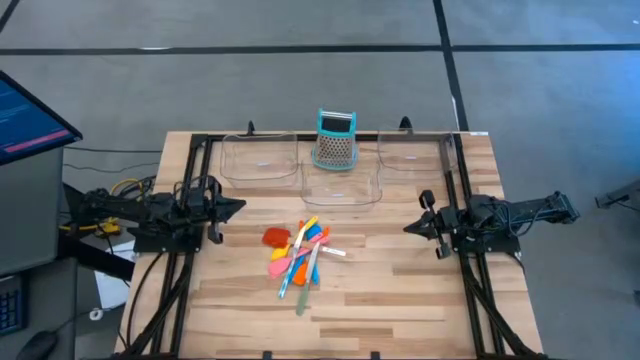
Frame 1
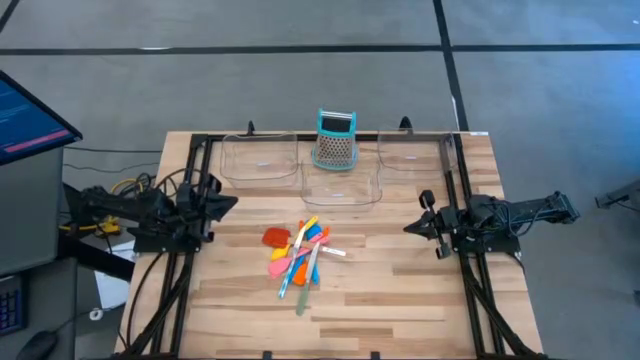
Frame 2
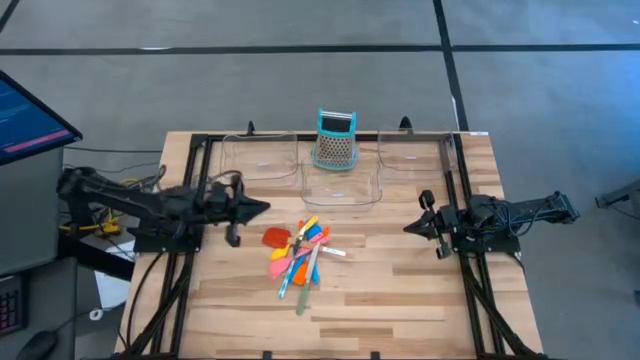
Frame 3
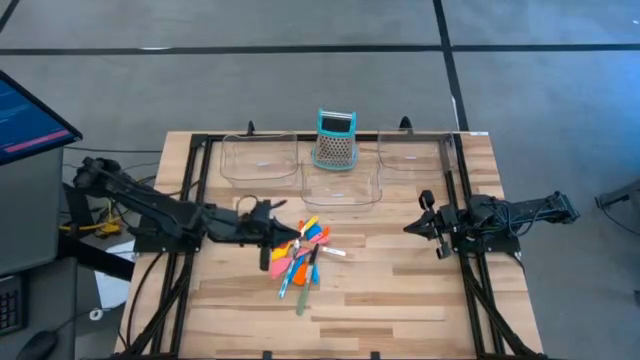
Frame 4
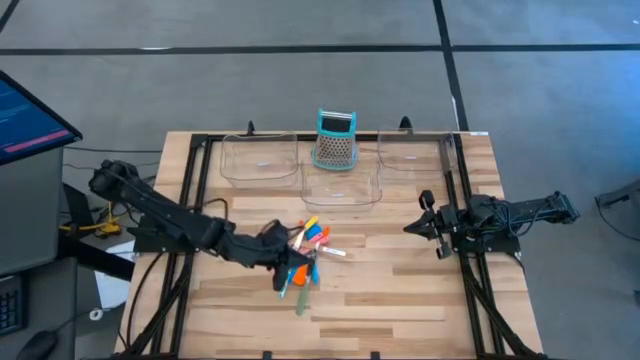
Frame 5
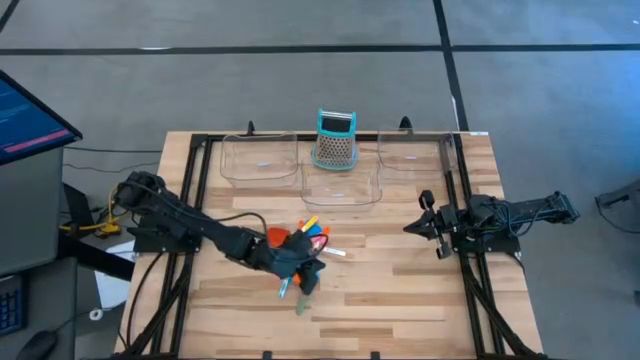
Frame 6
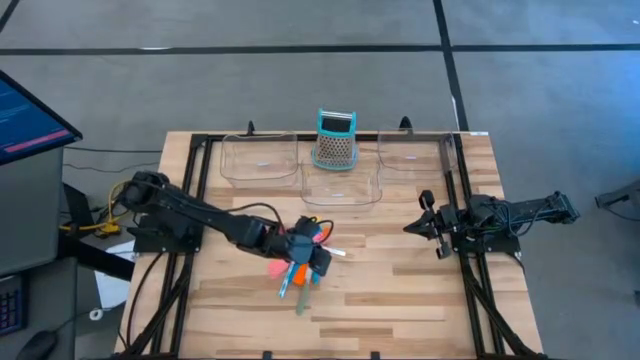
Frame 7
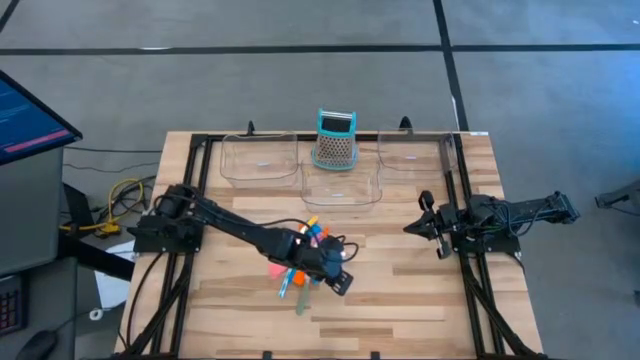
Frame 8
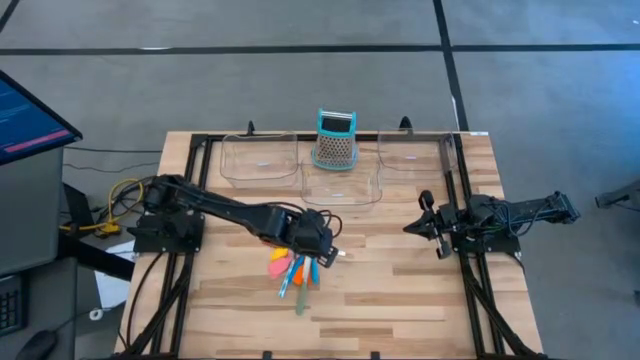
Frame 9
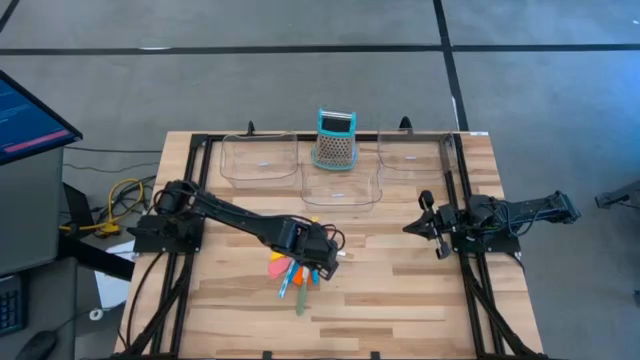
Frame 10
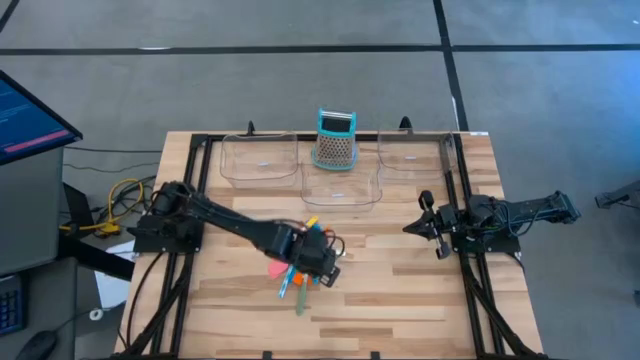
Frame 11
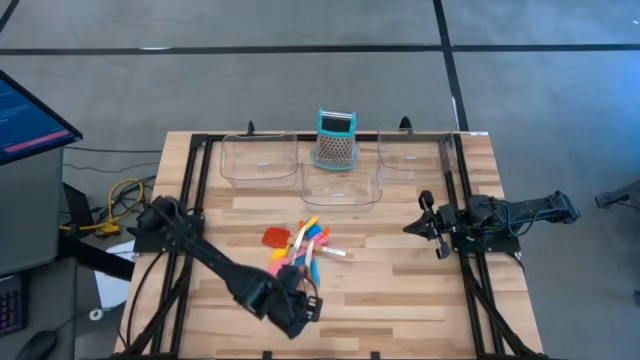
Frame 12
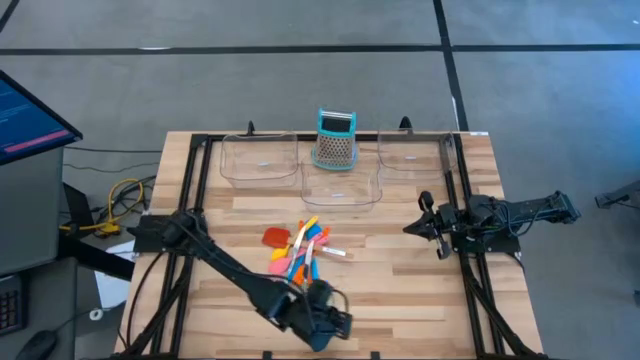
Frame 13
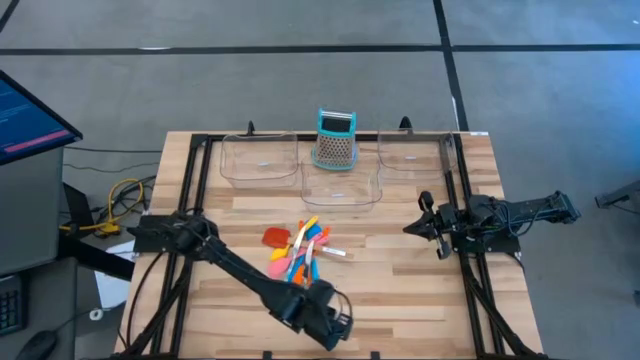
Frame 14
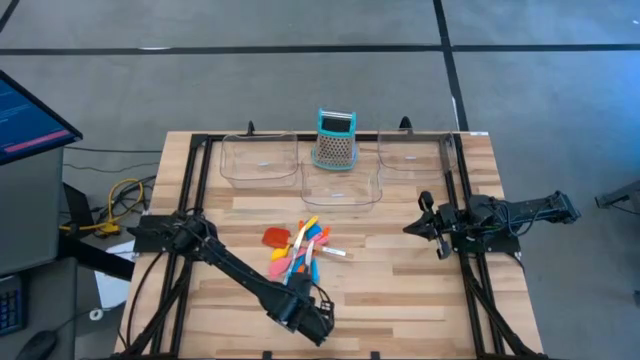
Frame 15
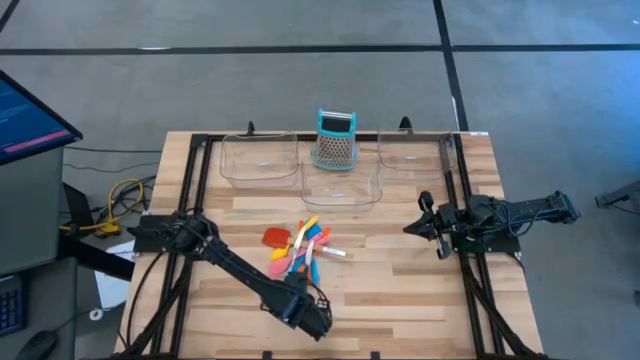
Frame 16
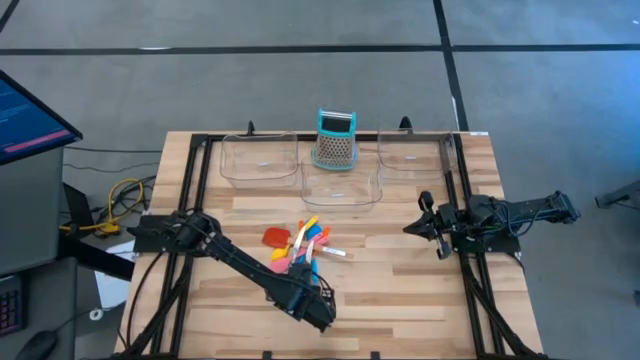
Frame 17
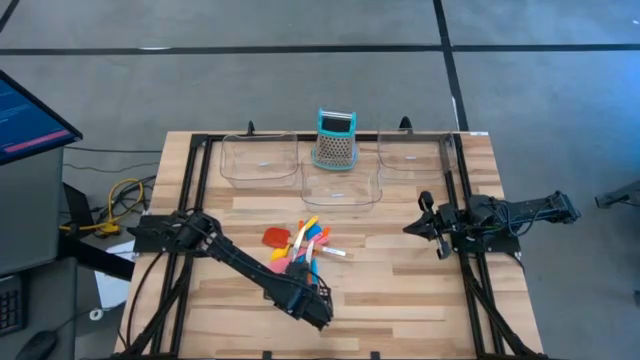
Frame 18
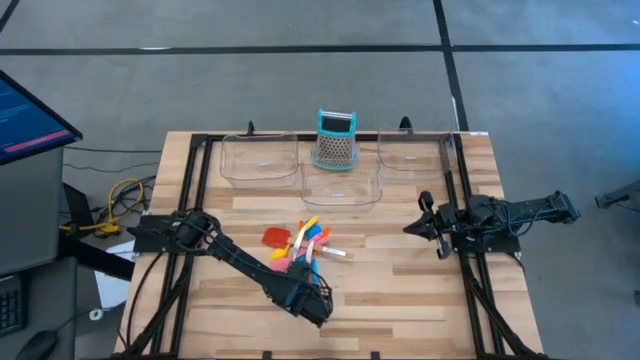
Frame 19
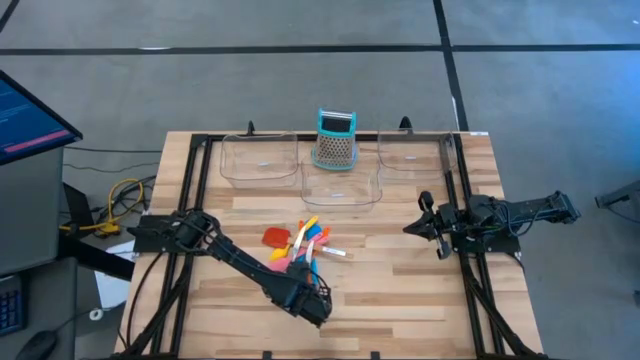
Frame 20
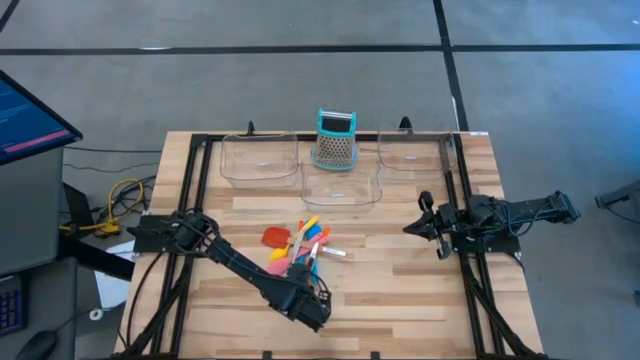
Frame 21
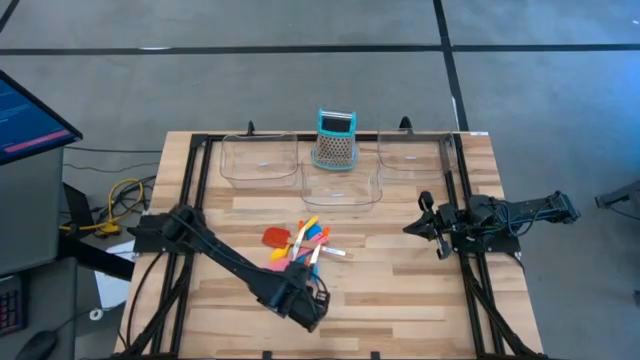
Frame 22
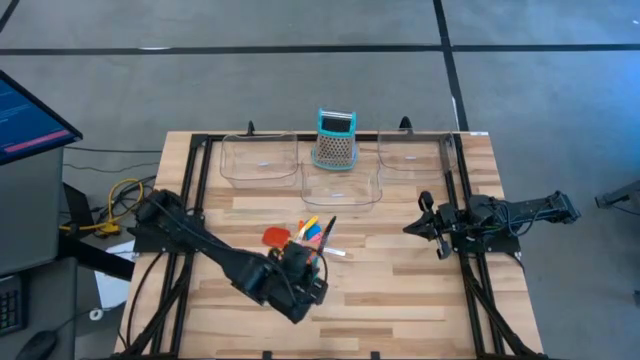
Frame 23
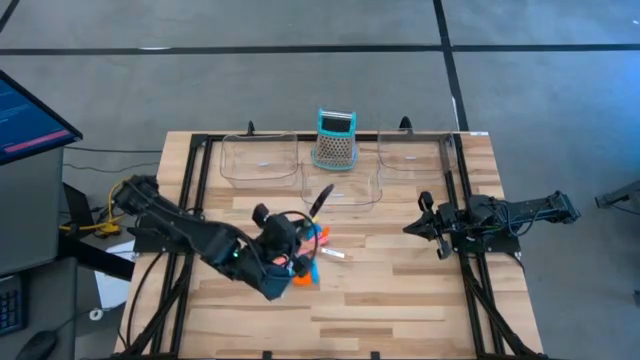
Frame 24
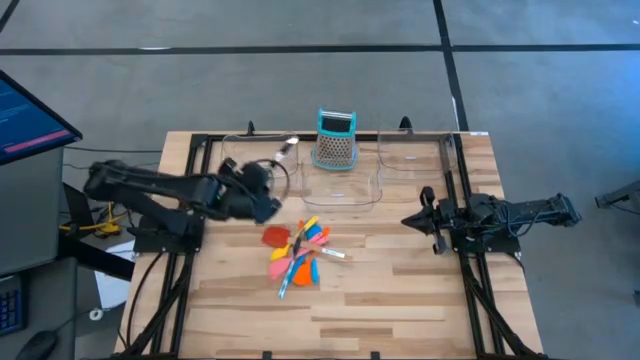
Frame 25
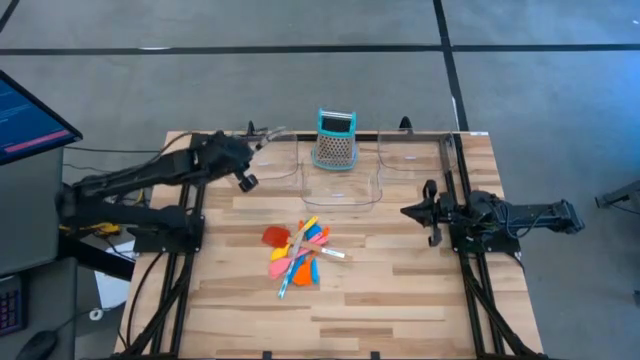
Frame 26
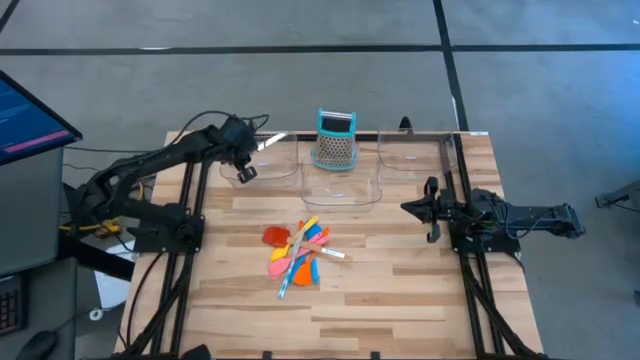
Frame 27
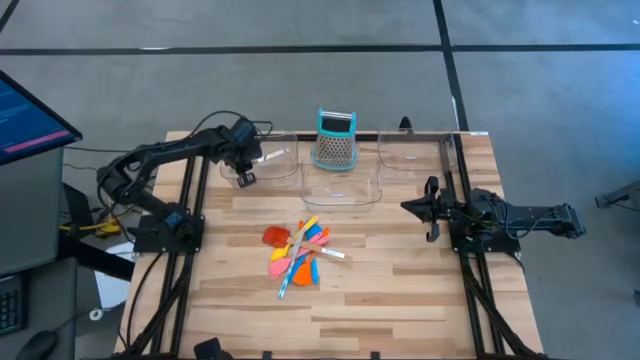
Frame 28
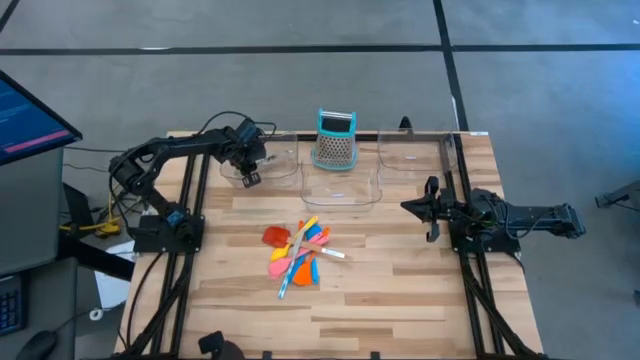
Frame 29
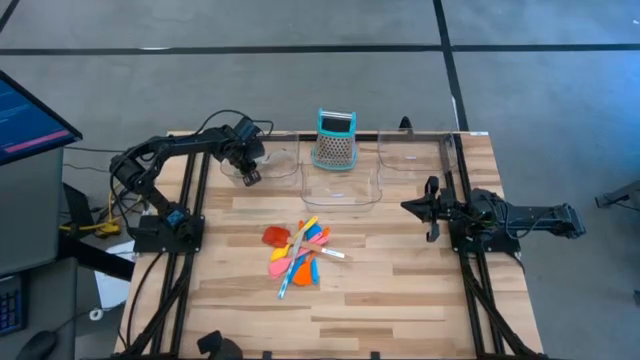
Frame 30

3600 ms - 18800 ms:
Task: Pick & Place Kitchen Items
Put the green table knife into the left transparent bin

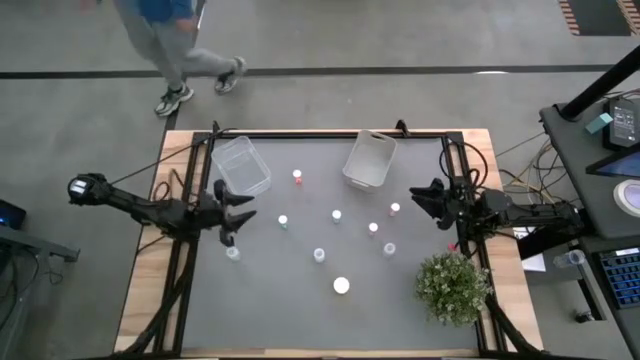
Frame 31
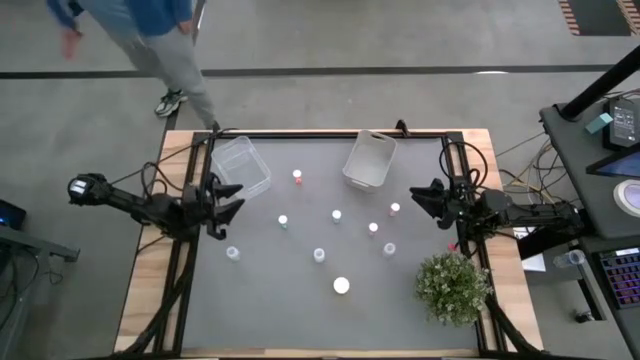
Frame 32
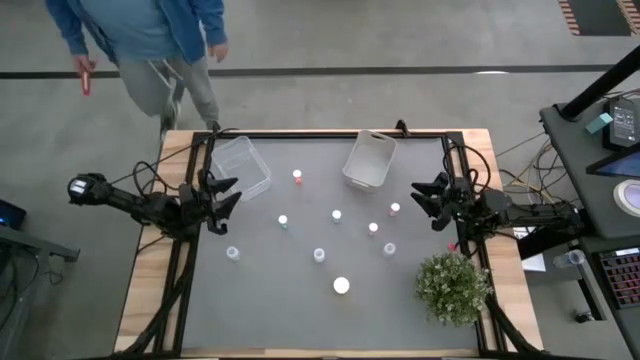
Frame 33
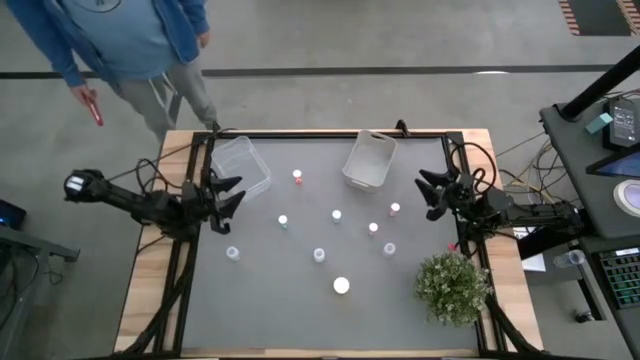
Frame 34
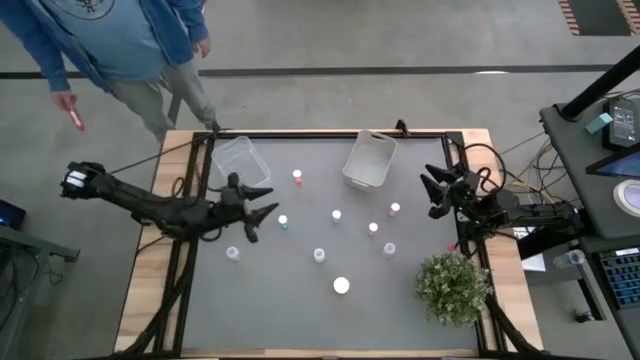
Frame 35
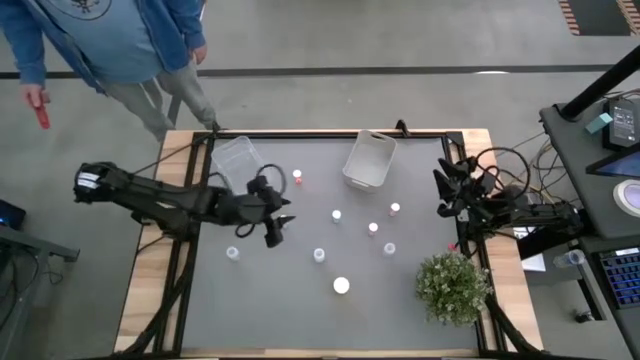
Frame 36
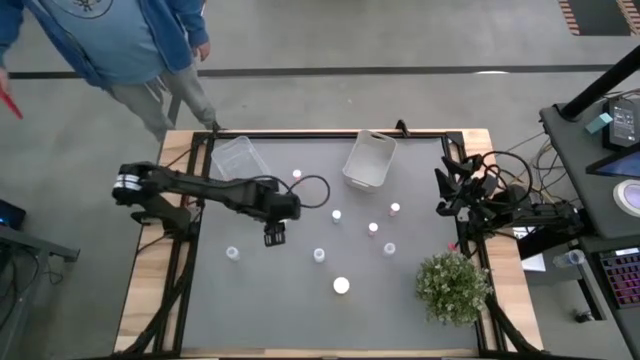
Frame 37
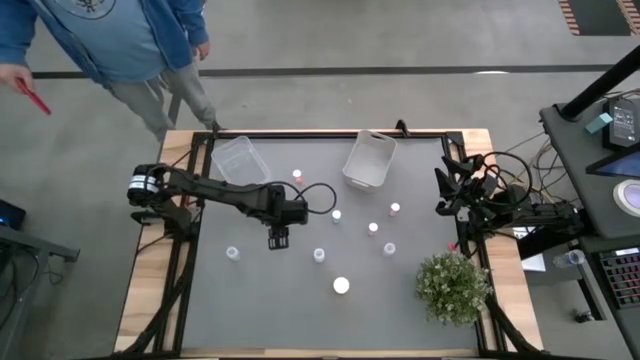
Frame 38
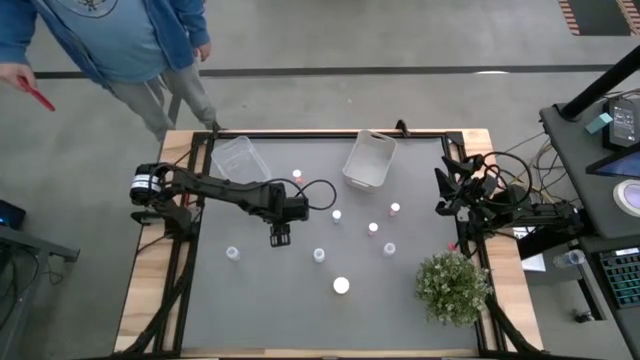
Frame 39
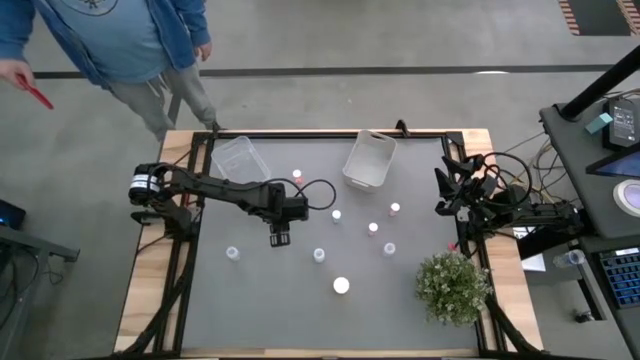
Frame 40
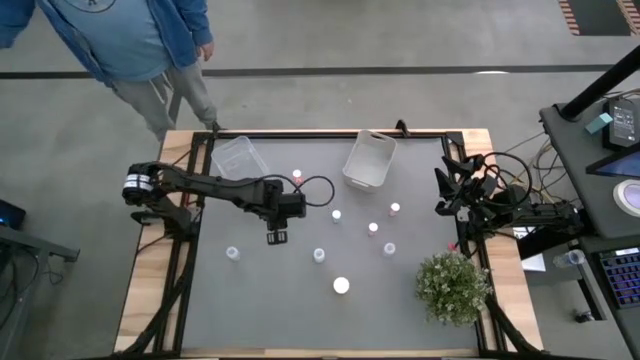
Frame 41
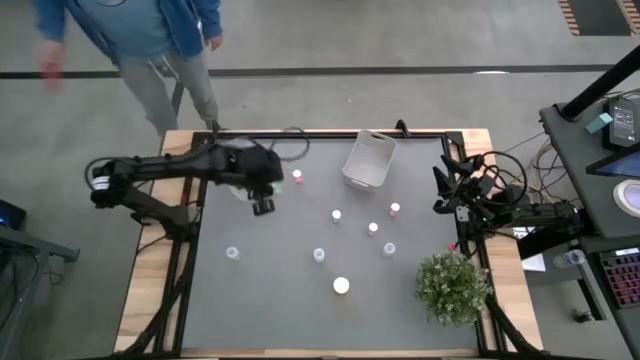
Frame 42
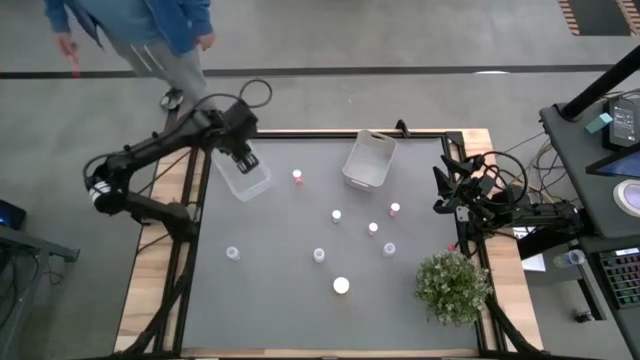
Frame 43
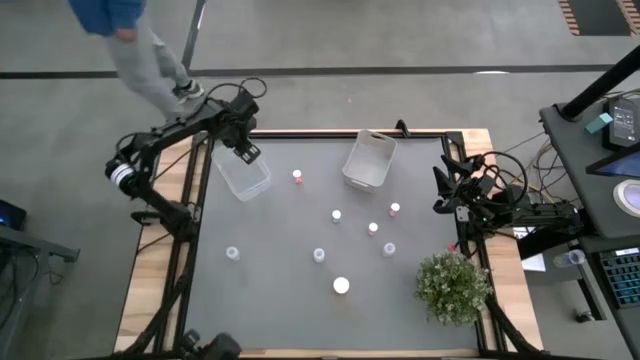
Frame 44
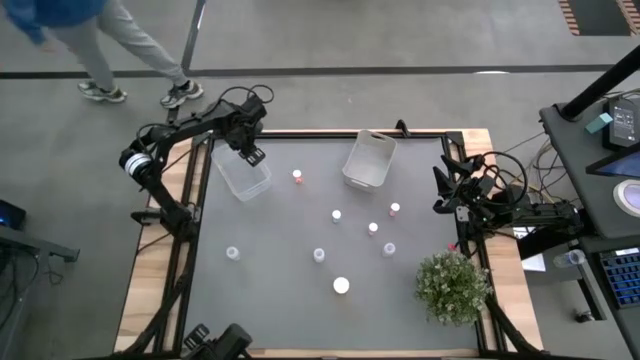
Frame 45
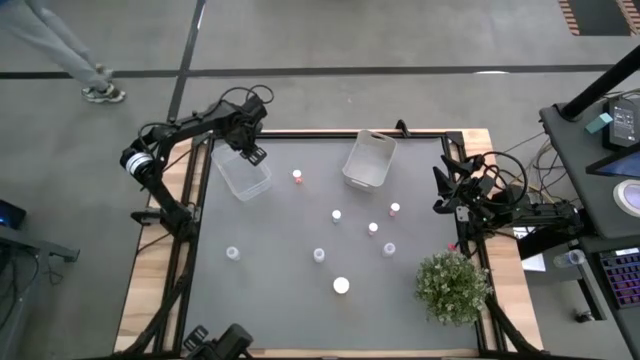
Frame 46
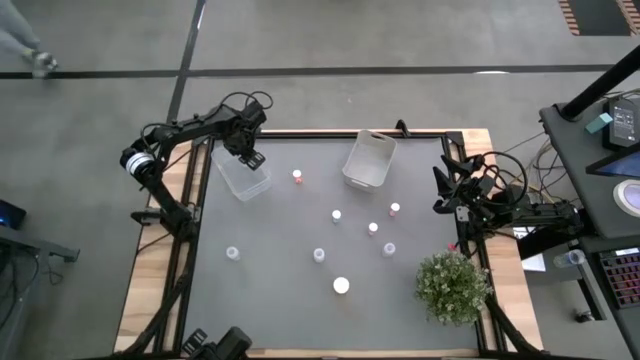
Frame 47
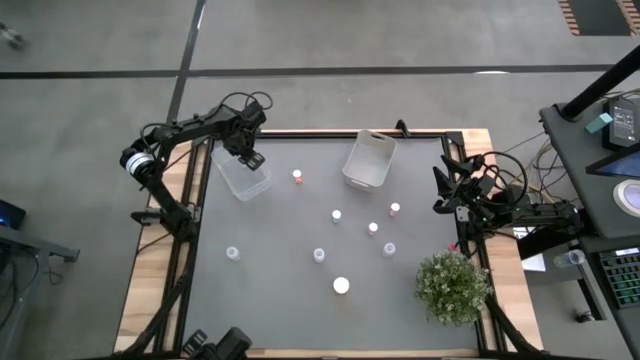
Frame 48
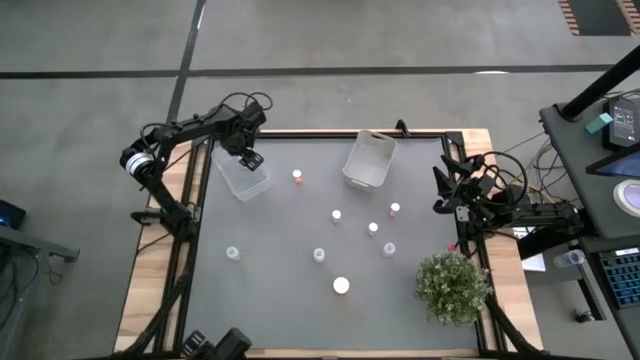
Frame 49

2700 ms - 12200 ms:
Task: Pick and place medicine bottles into bin by pill shape (circle, oval)
Put the left blue pill bottle into the transparent bin
